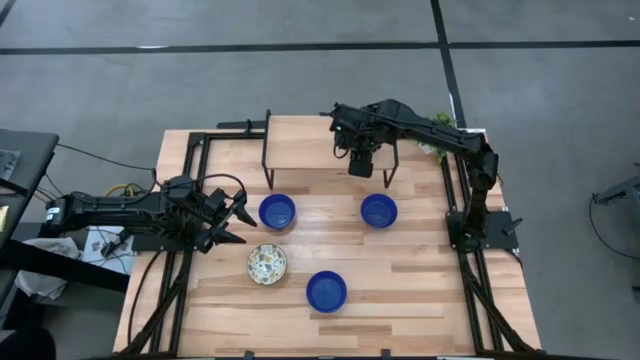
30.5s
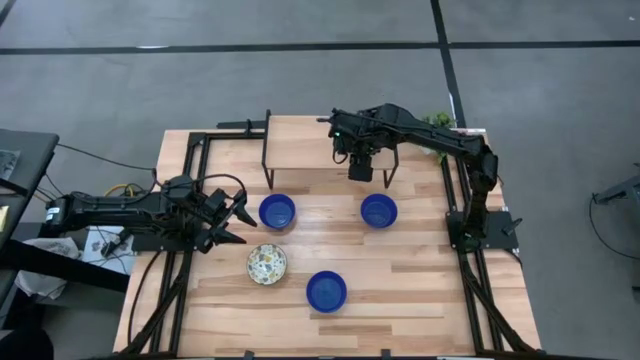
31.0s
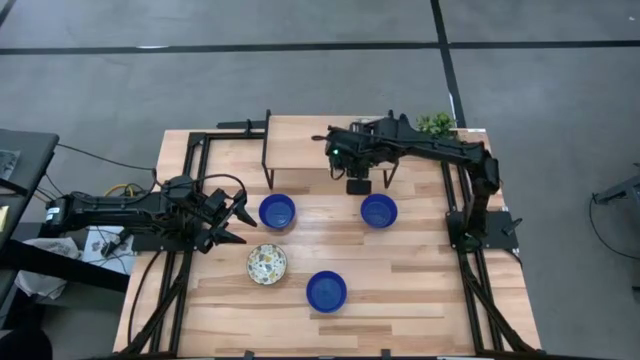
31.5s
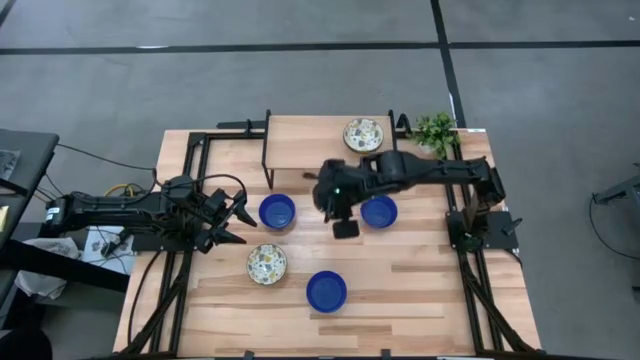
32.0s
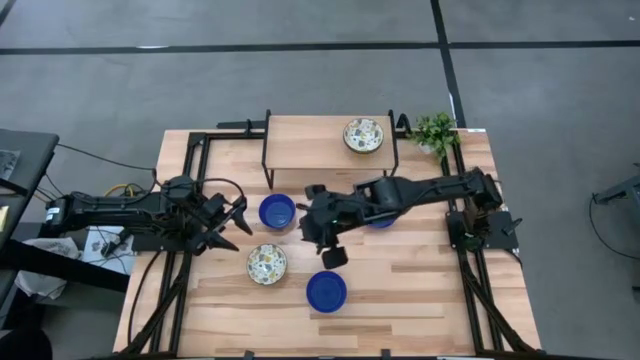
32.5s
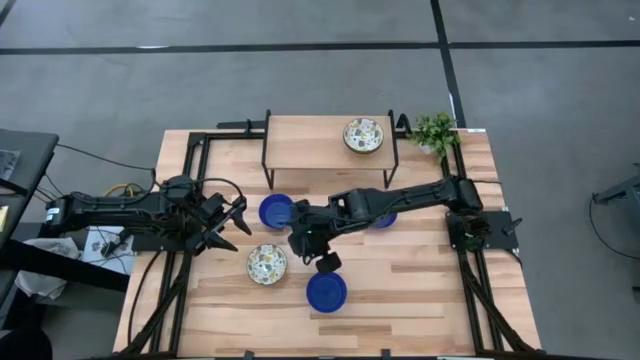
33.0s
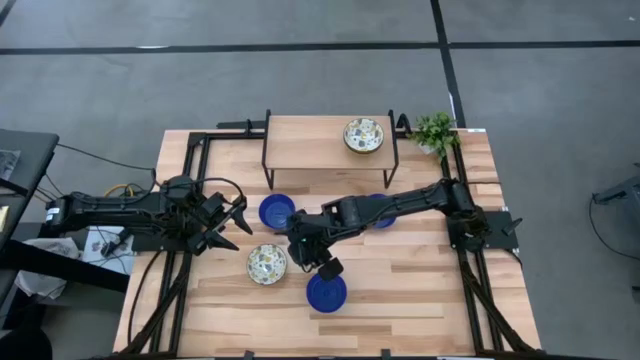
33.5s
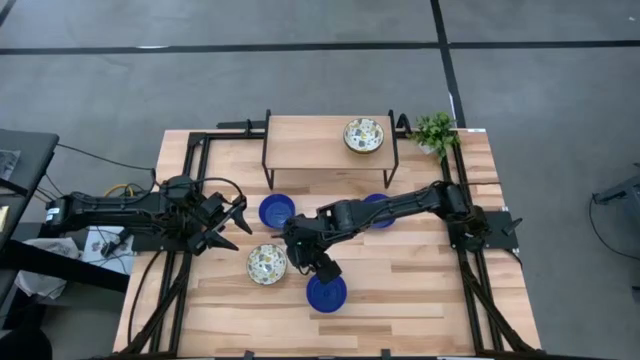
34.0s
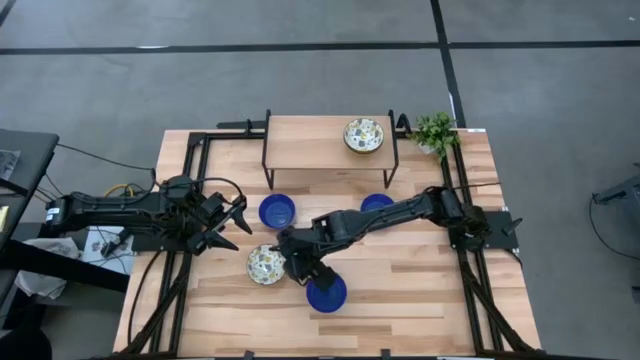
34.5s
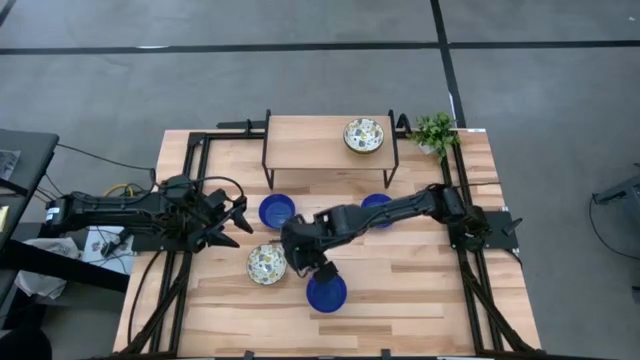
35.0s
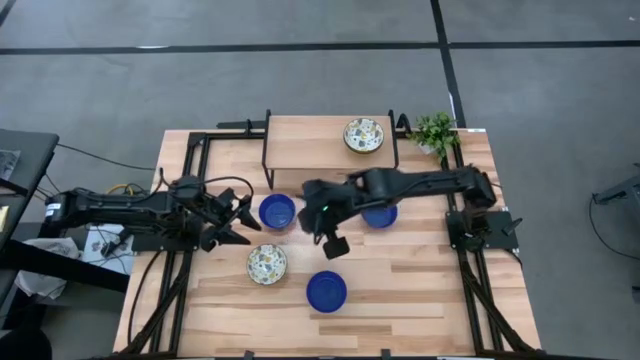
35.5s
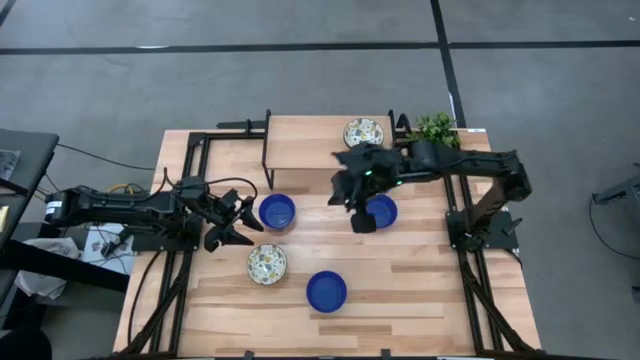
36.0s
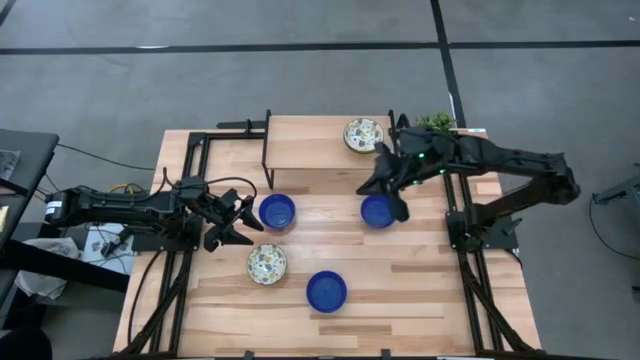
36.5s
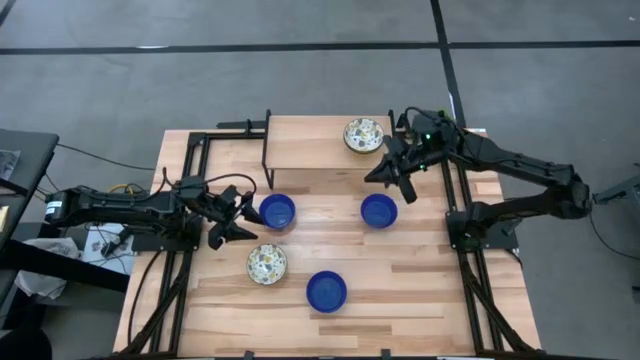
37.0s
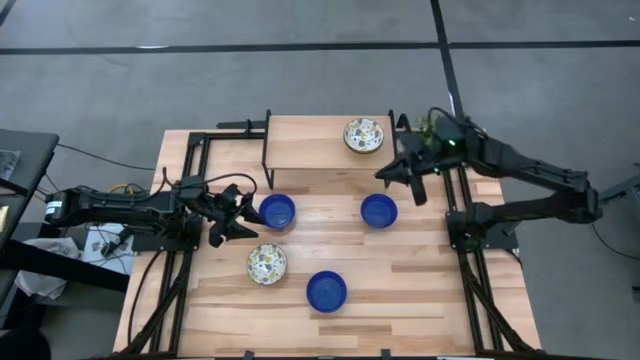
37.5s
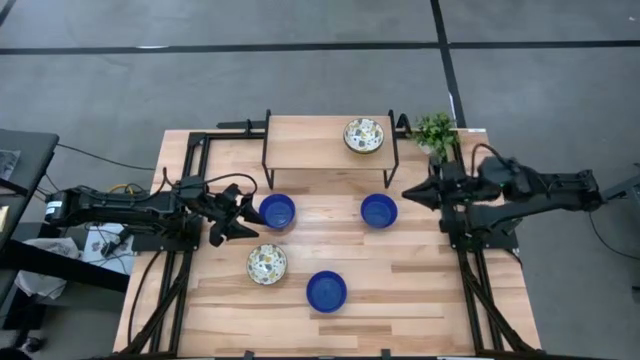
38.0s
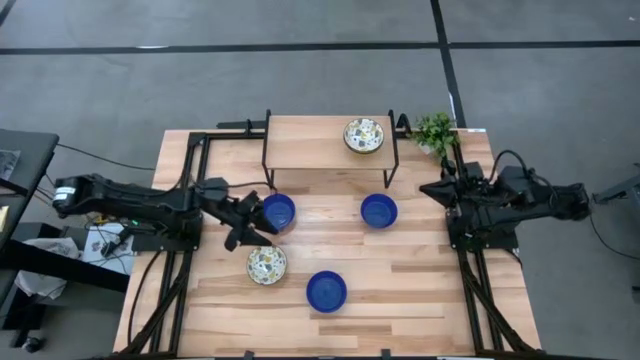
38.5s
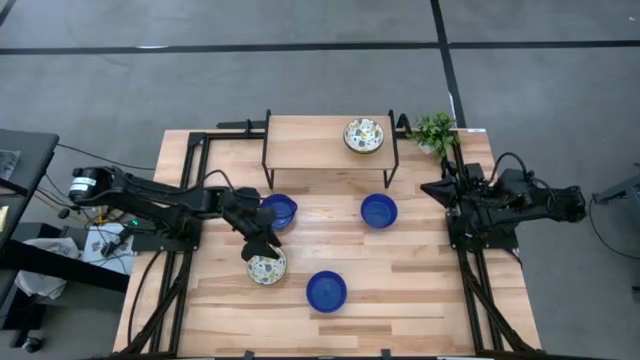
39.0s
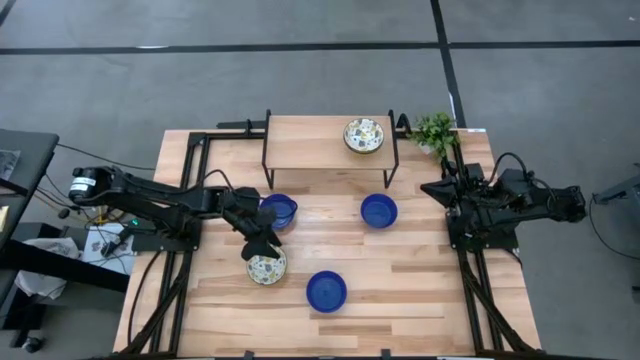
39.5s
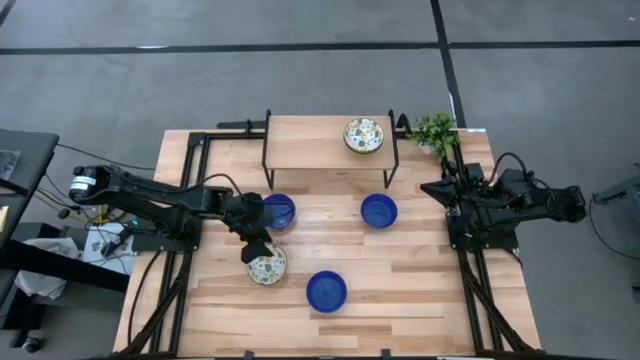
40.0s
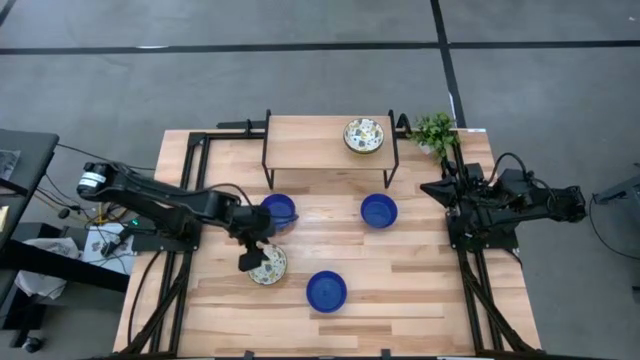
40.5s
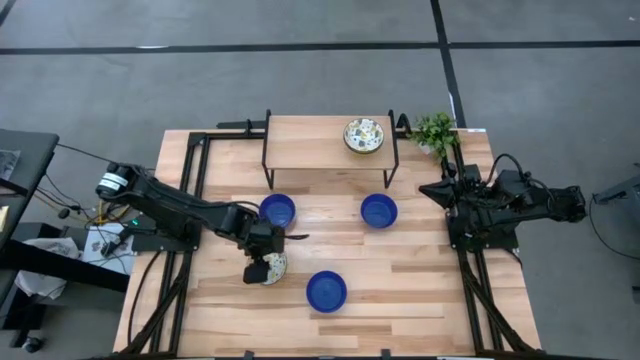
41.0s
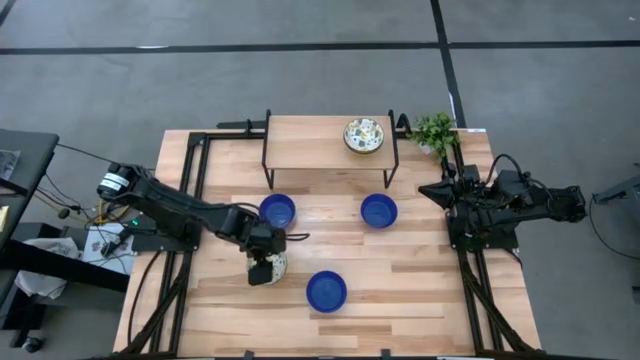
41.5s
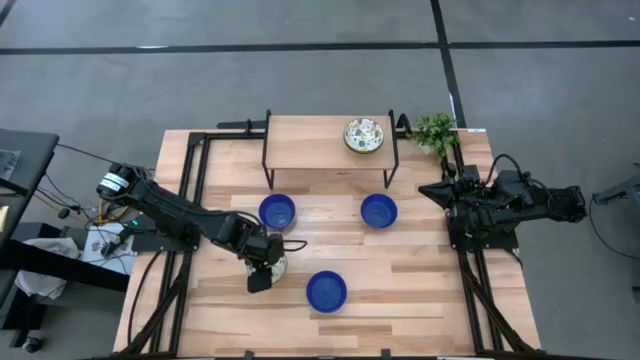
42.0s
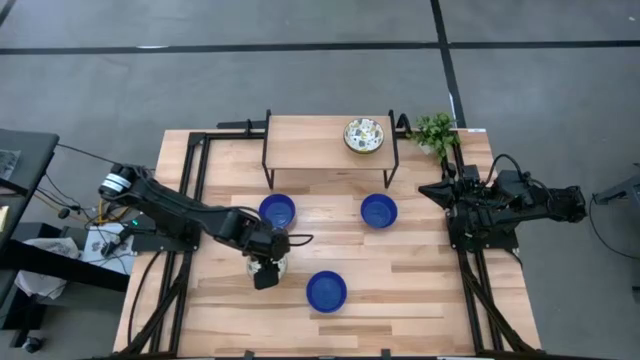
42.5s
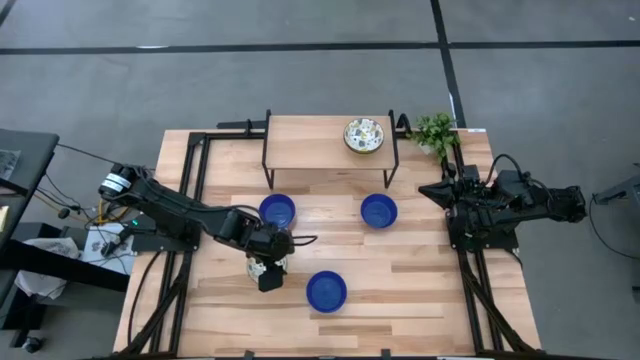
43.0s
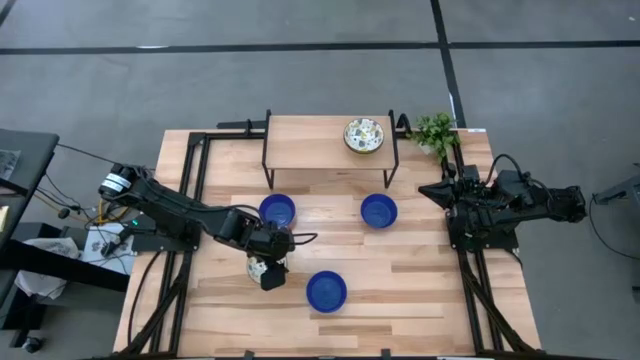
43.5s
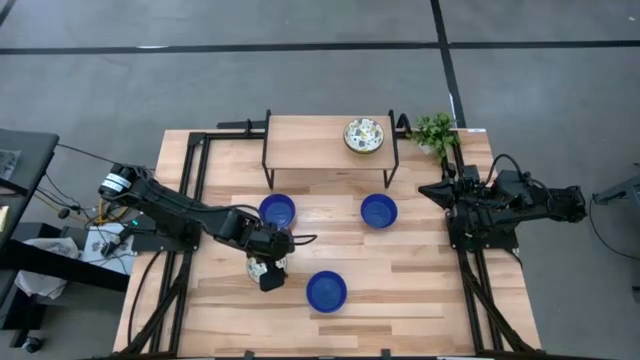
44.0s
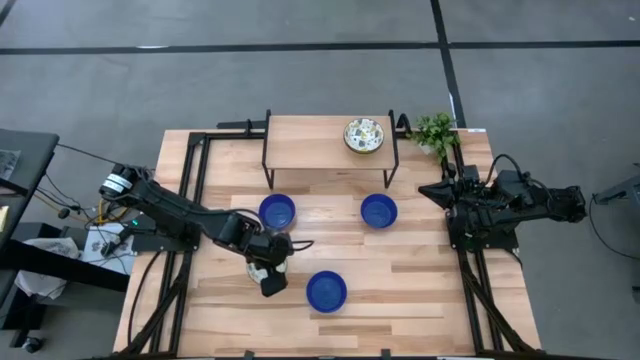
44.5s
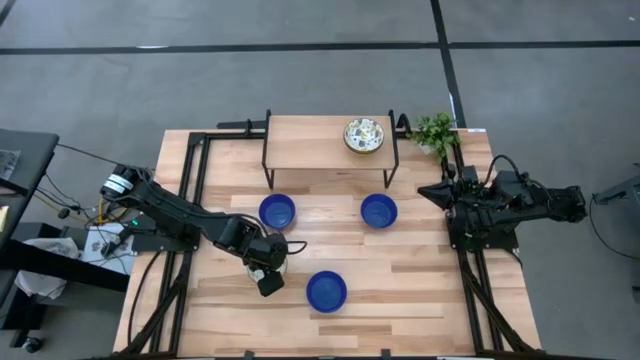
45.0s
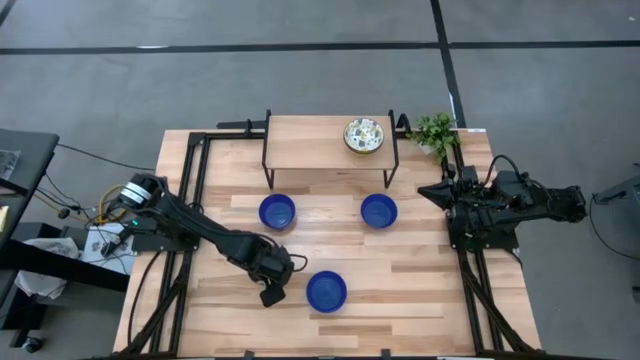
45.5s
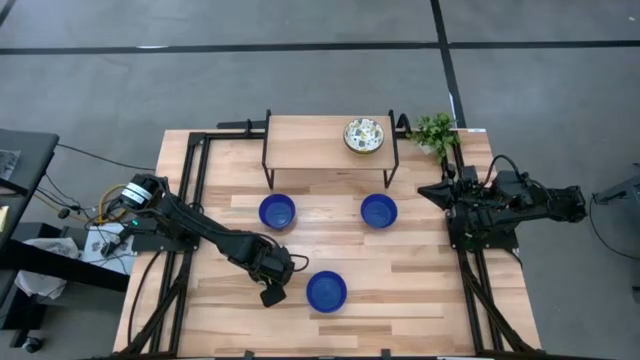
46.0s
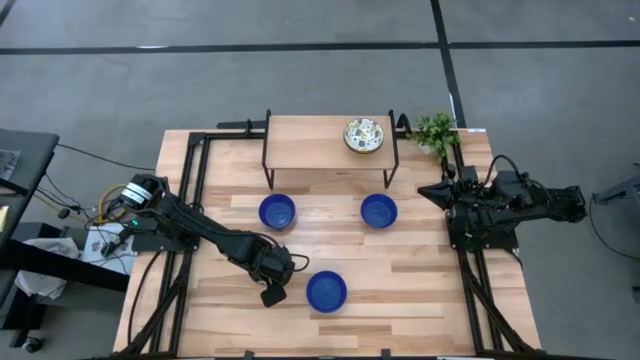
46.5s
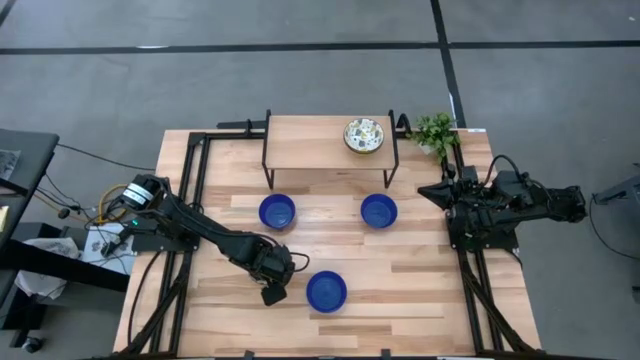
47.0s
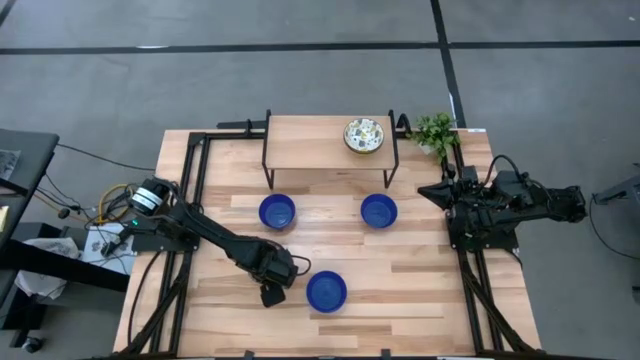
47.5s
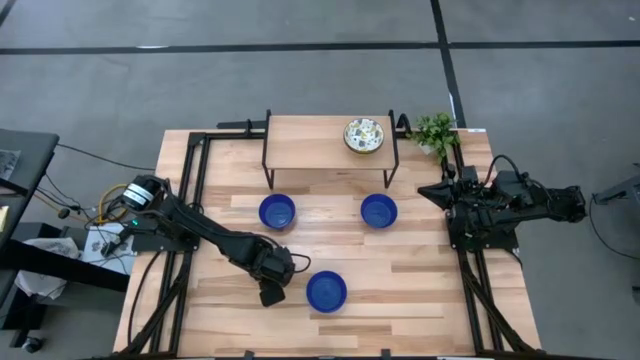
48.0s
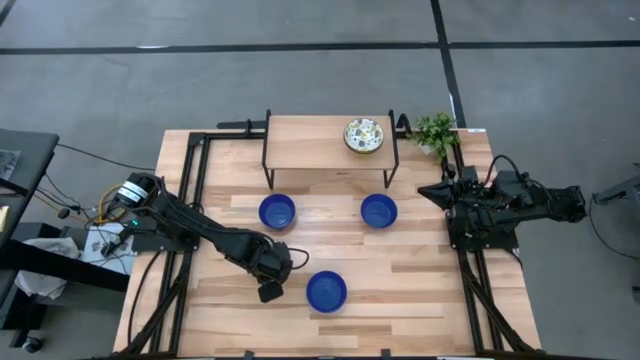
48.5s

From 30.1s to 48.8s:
Task: Pick & Place Mini bowls
Stack the white patterned bowl on top of the white bowl on the shelf

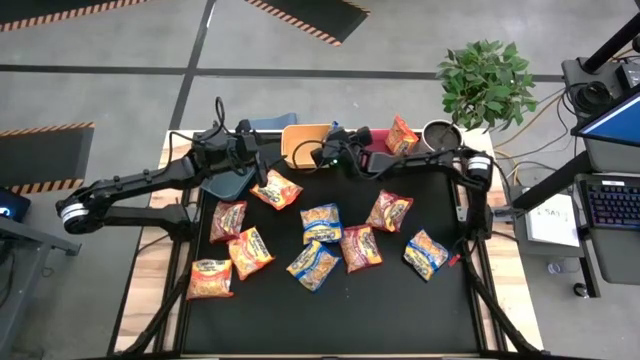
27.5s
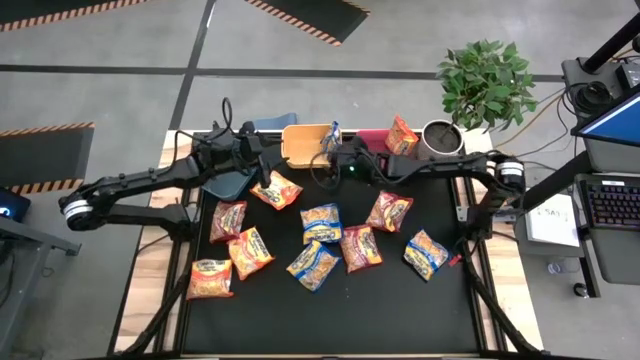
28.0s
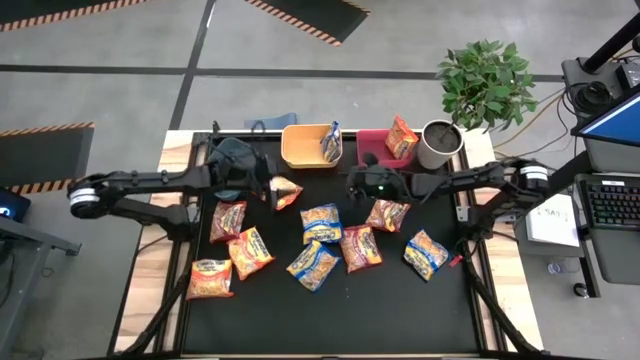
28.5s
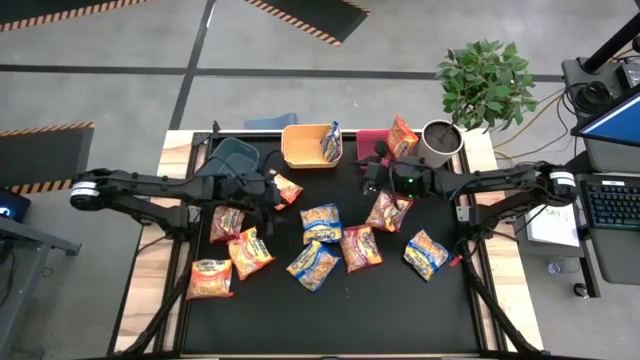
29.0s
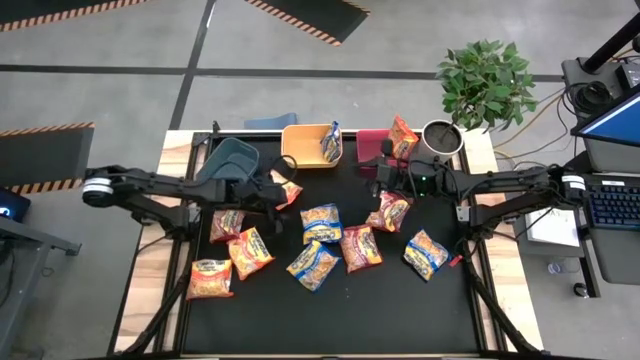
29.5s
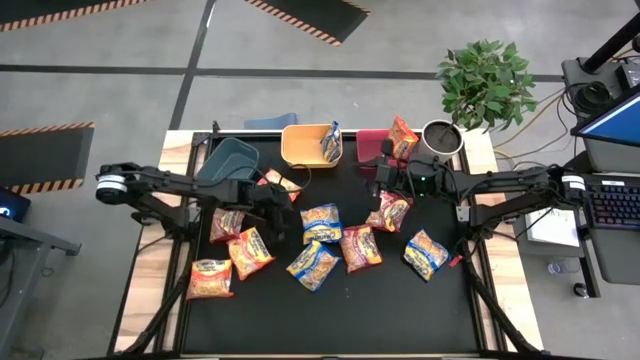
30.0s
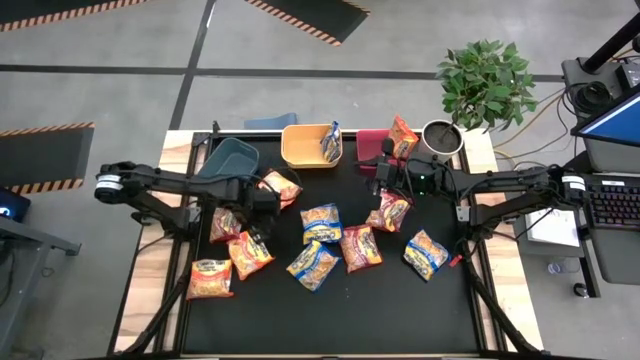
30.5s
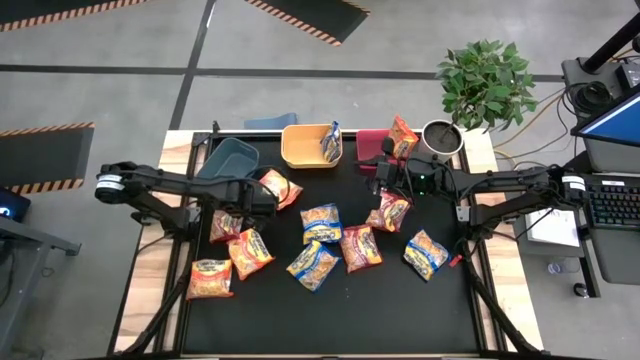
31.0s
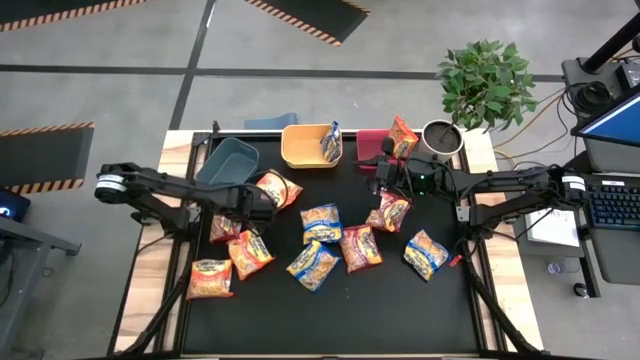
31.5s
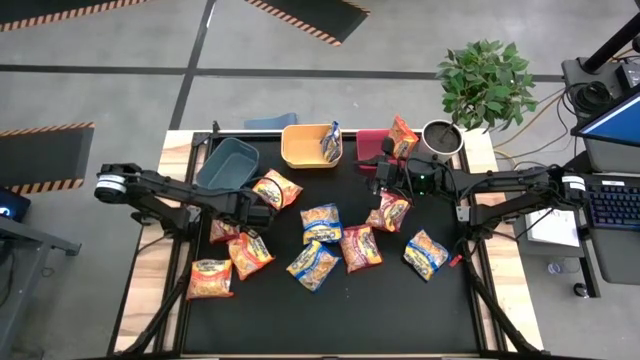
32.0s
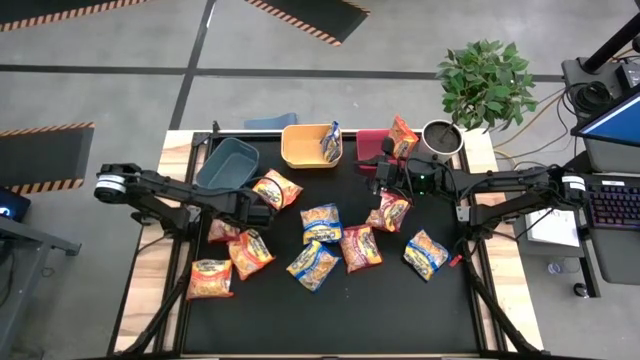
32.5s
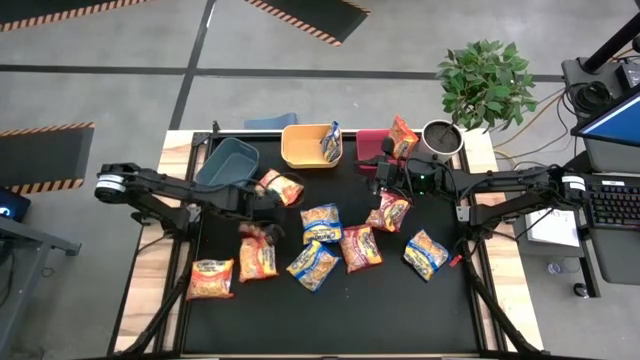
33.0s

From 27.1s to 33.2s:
Task: Sort Maruchan noodles
Put the red noodle into the blue bin
